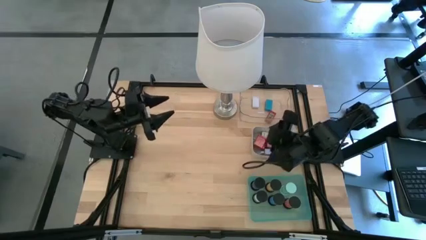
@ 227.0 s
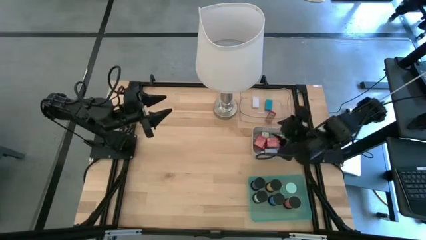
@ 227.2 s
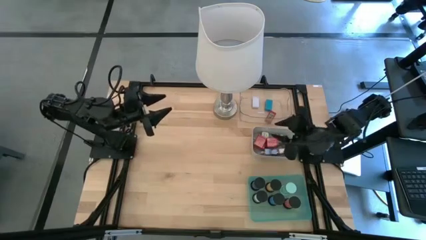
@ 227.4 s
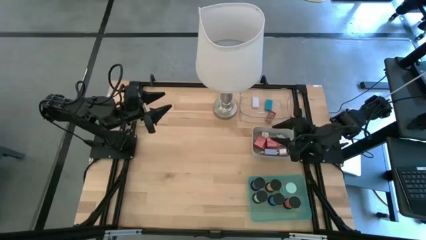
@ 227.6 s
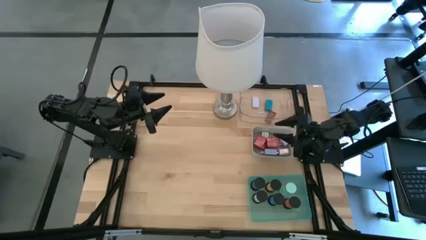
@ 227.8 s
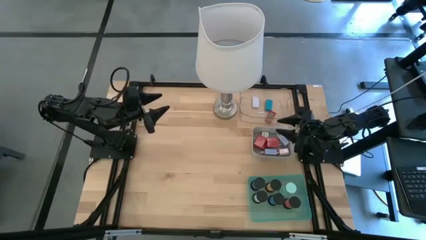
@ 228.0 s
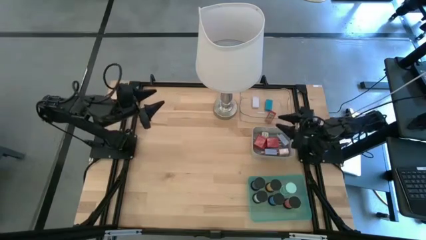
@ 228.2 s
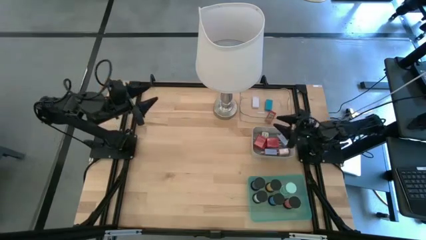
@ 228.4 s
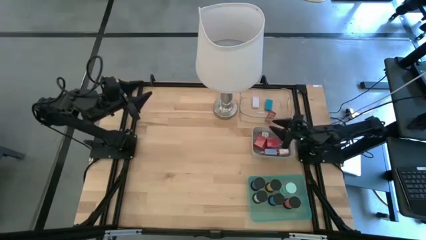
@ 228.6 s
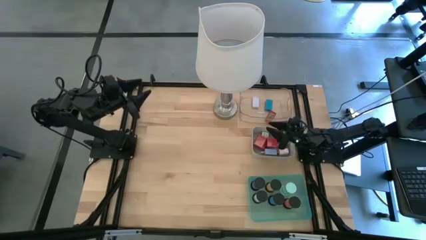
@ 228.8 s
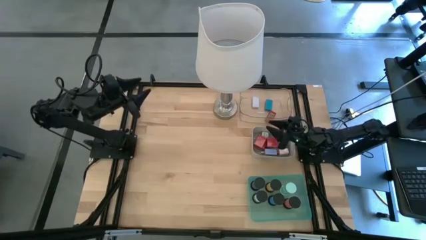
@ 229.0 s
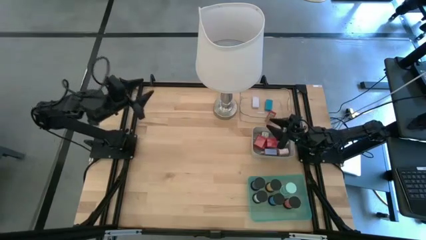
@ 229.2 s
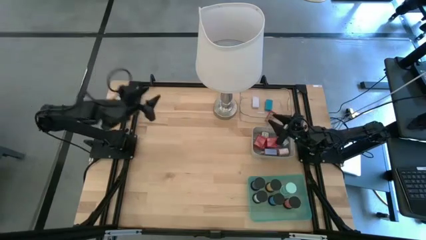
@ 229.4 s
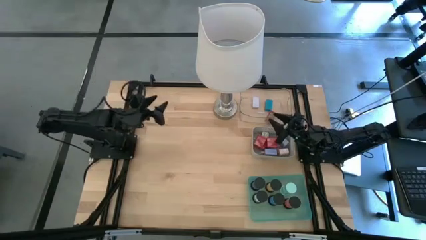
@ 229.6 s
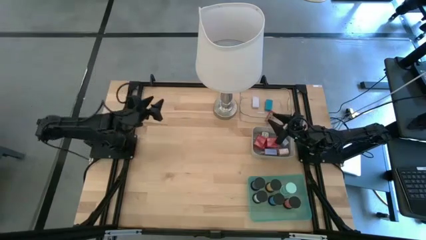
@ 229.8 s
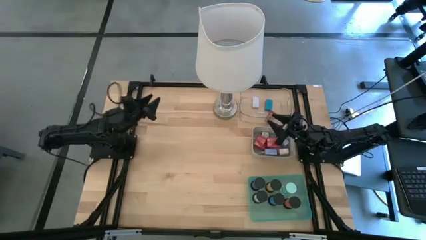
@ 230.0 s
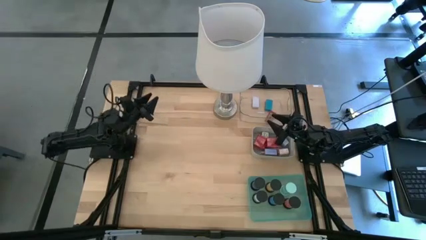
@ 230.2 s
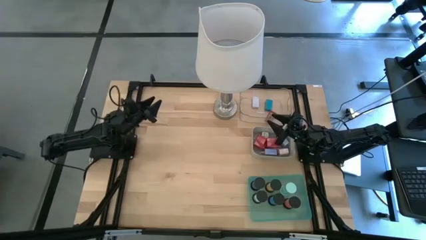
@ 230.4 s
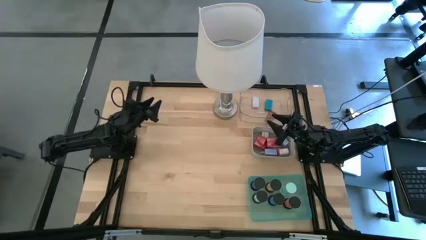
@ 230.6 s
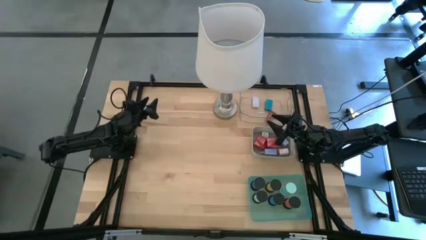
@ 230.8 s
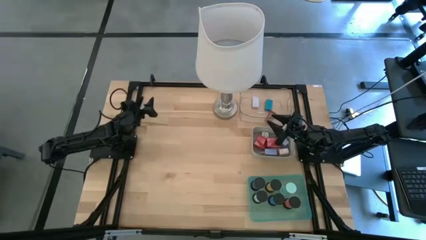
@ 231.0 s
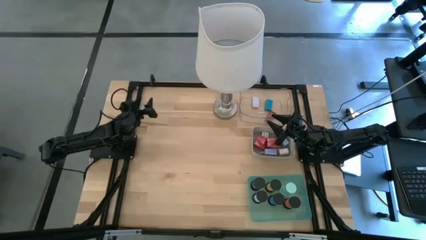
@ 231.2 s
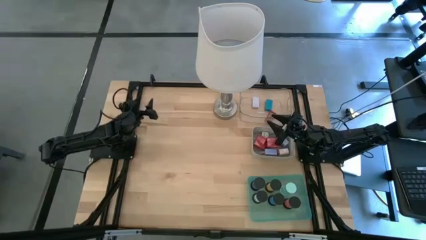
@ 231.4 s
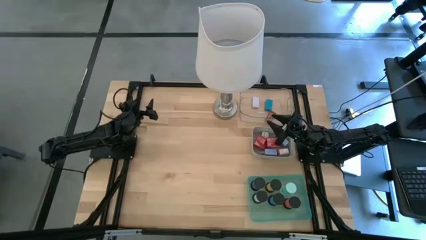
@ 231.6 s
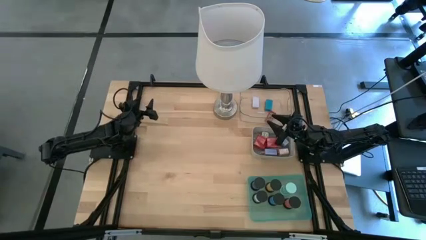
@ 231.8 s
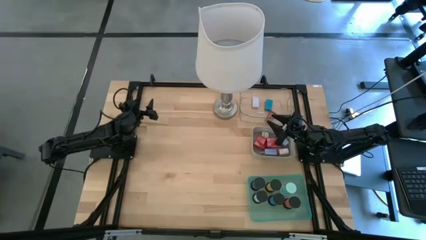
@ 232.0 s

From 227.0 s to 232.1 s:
Task: Pick & Place Office items
Return to Home Position

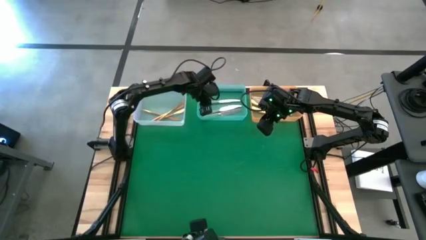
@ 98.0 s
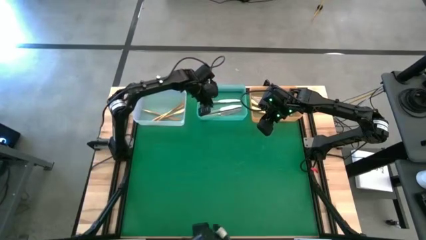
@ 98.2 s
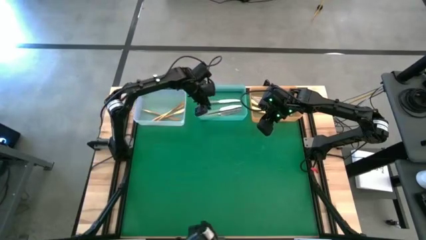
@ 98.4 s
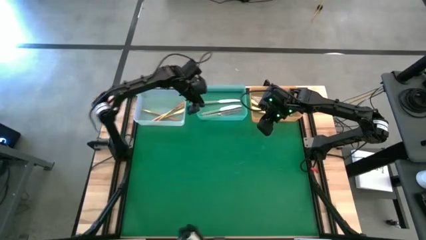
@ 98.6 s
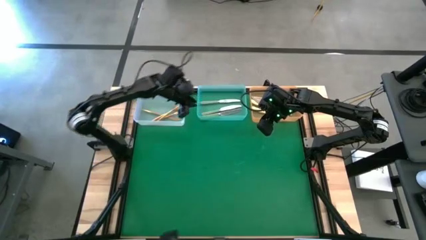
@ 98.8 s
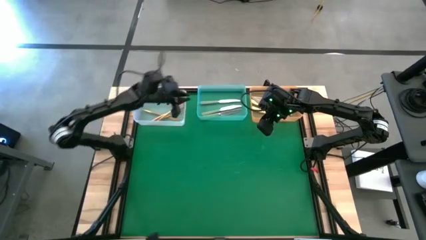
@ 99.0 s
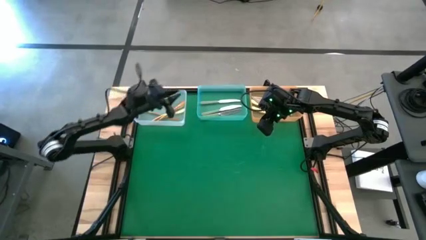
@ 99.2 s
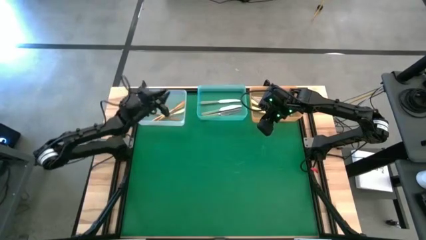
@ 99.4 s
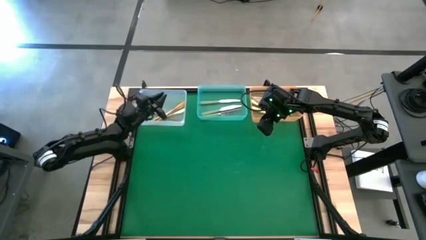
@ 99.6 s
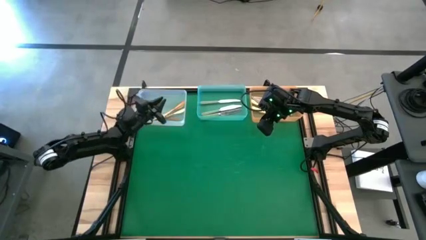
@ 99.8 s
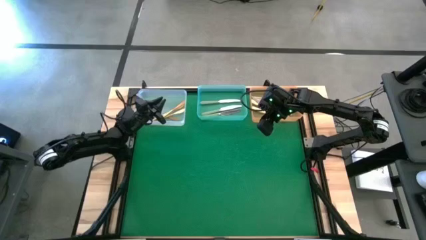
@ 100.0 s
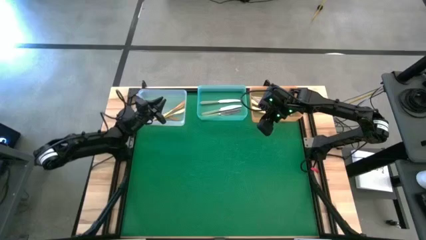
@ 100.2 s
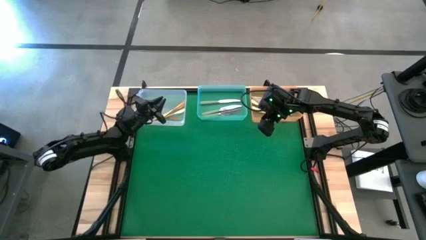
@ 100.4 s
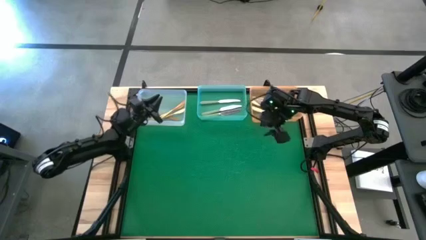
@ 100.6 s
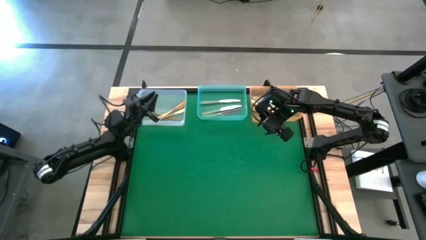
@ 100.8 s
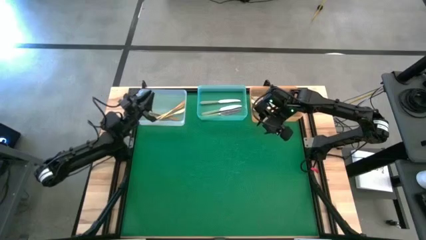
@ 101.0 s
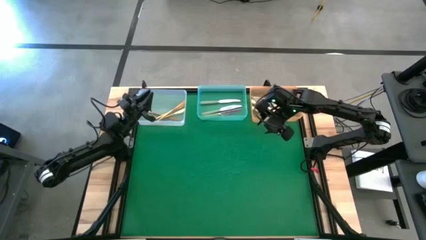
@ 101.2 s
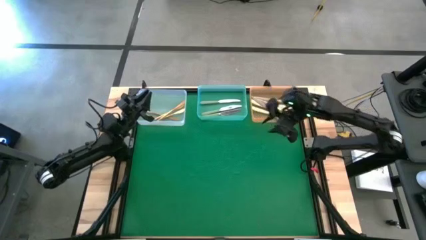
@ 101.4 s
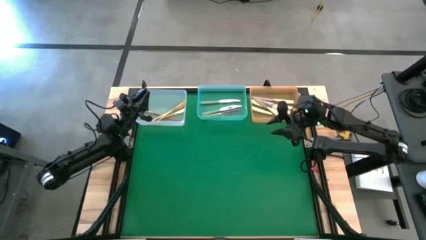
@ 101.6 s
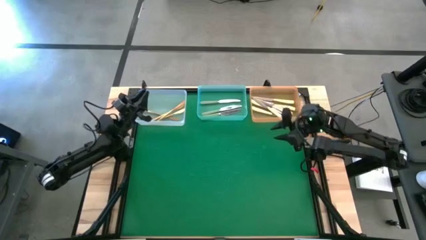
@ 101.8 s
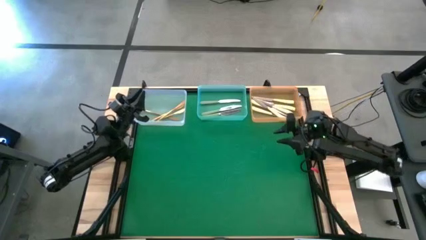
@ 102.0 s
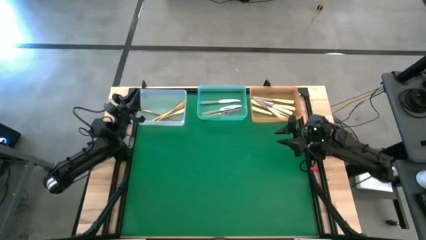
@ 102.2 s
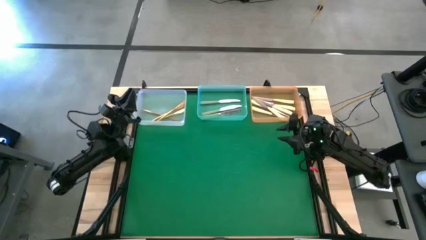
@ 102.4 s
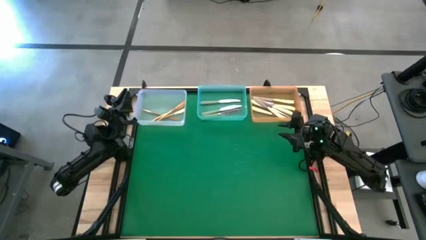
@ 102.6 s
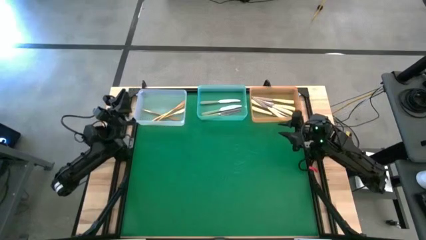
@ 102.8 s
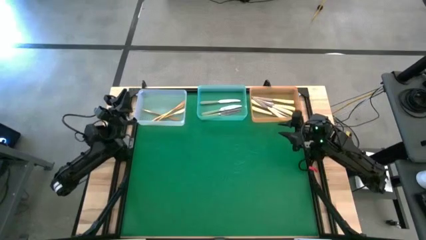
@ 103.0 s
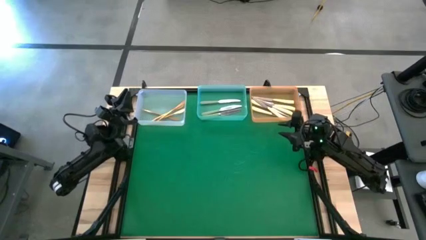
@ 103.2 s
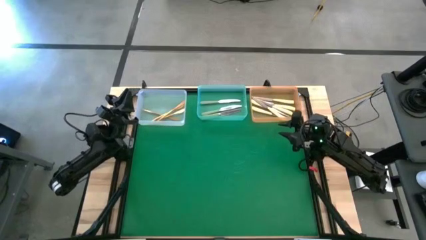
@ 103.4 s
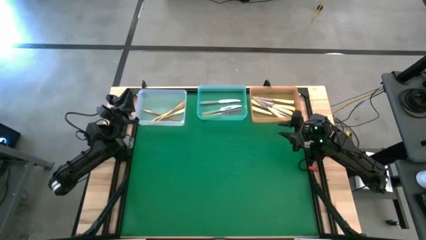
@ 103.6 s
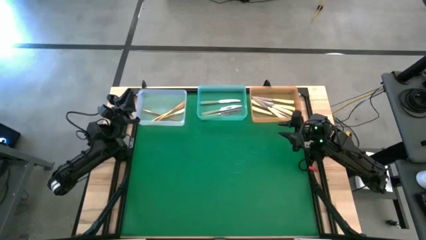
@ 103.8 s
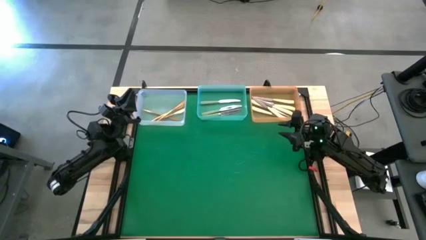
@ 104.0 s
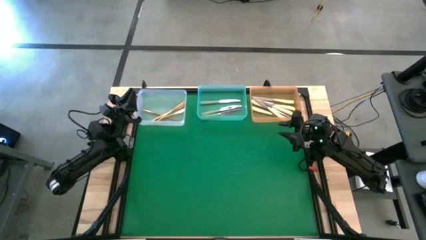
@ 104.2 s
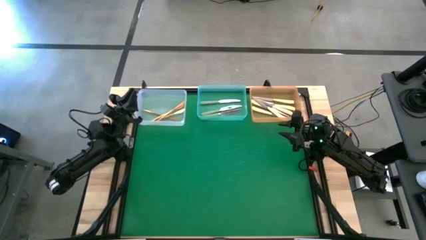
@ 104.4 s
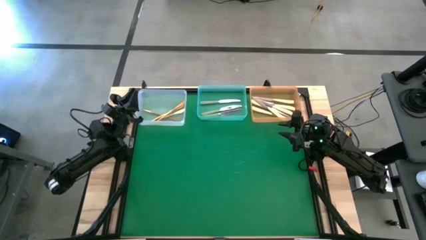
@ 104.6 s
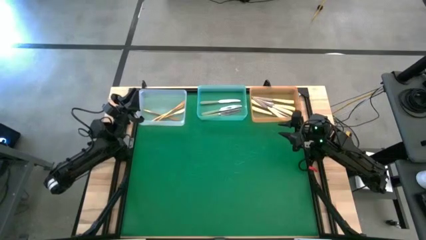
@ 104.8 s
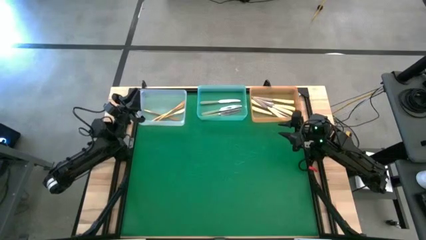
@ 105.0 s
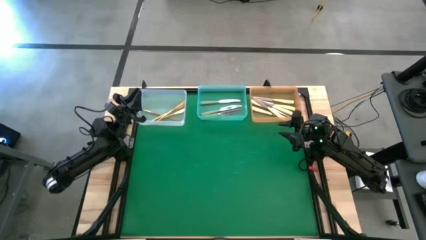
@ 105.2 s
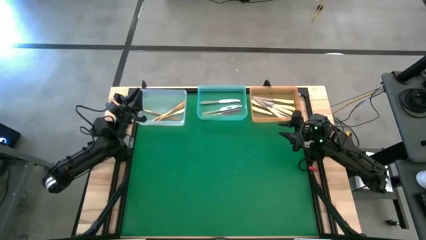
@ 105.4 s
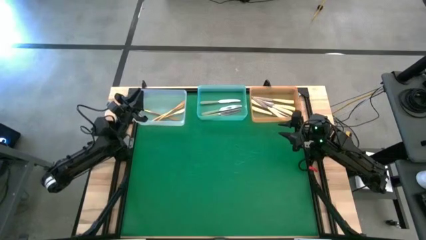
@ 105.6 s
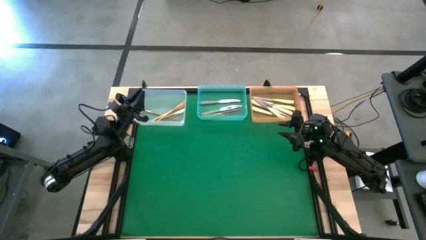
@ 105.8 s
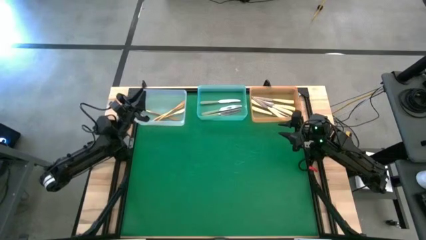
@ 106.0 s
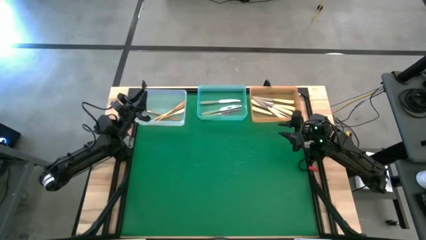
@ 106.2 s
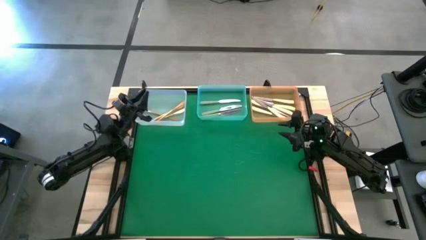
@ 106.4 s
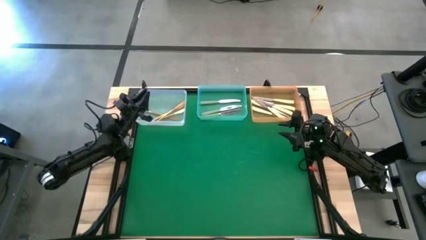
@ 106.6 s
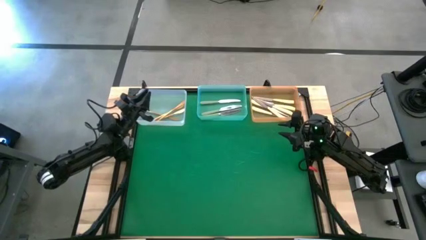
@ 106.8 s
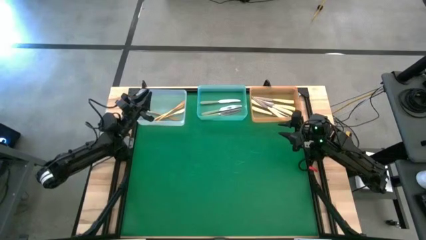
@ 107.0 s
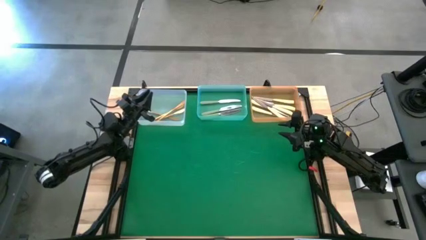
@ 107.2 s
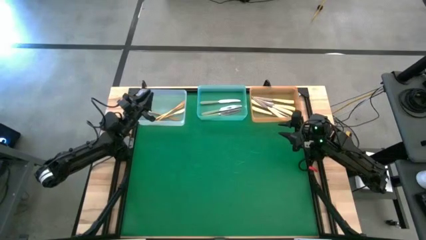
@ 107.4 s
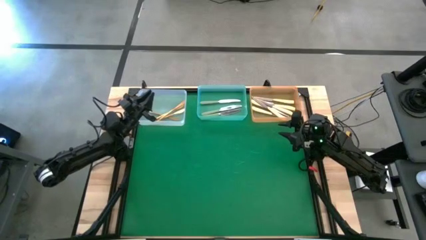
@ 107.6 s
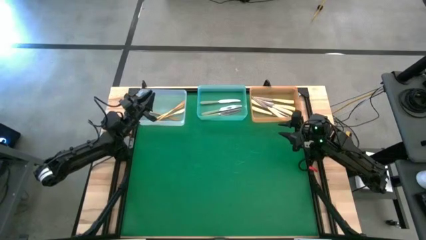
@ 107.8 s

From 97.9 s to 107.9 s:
Task: Sort silverware by color (type)
Return to Home Position
